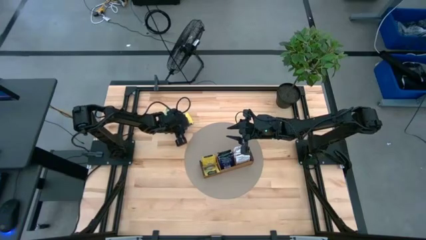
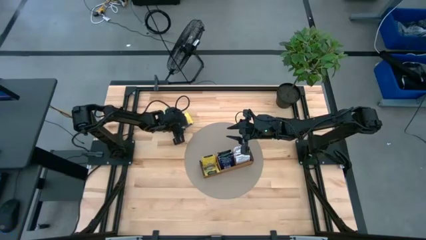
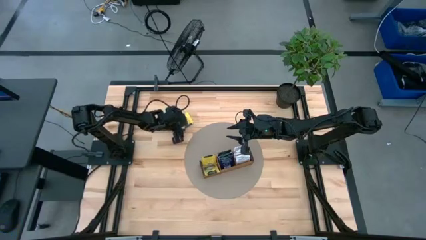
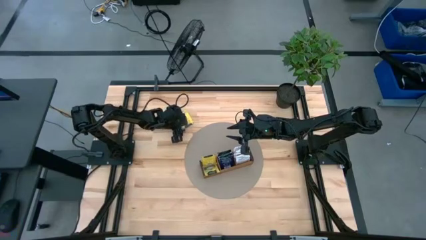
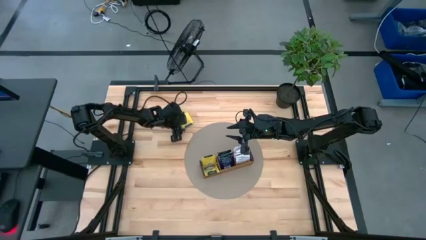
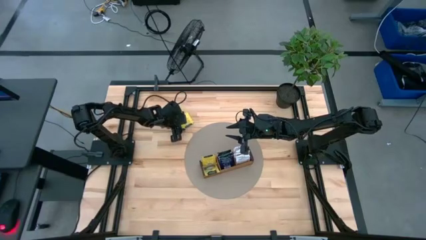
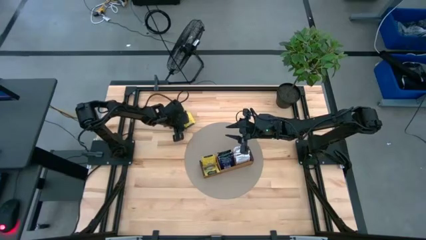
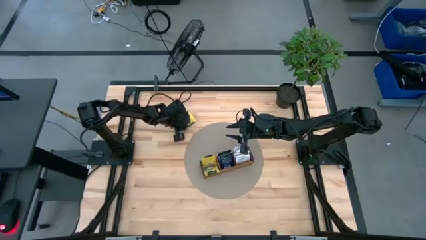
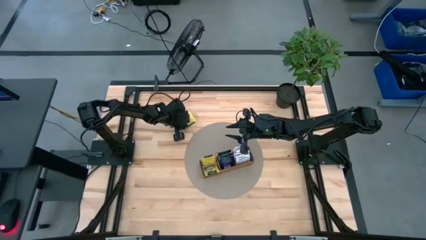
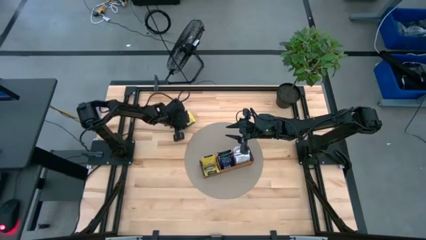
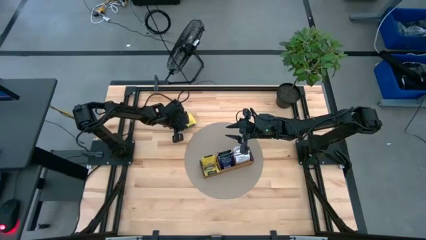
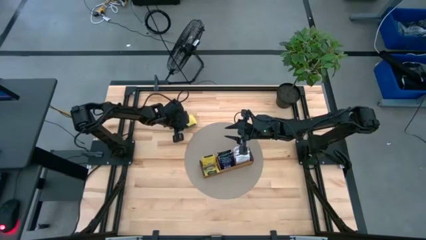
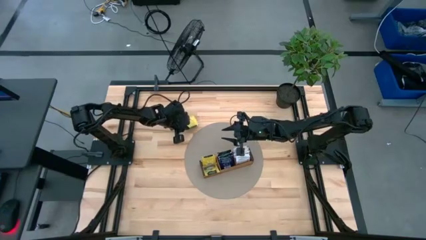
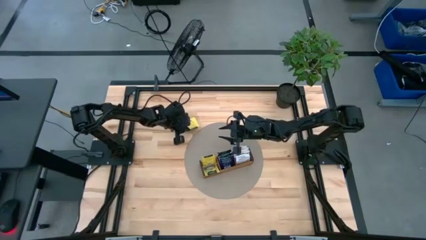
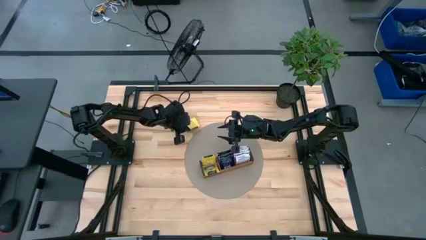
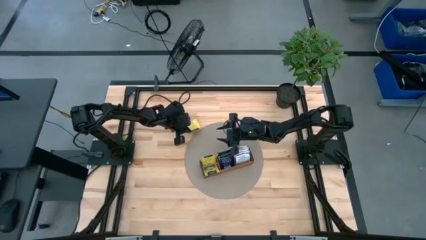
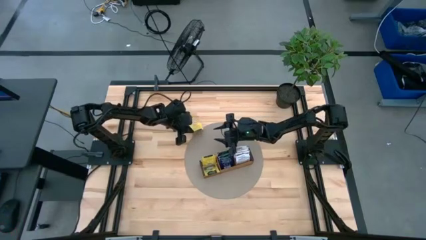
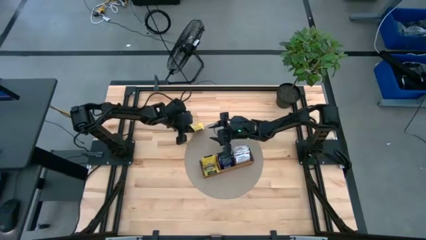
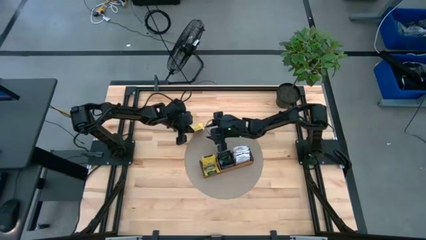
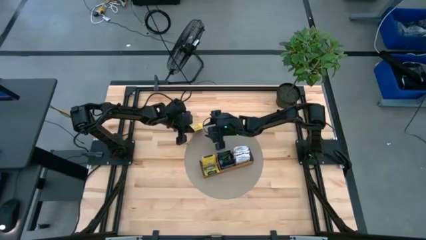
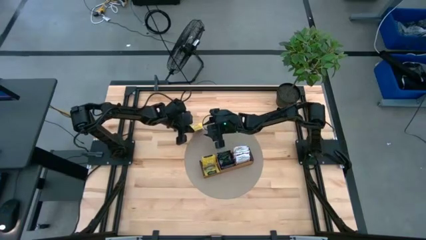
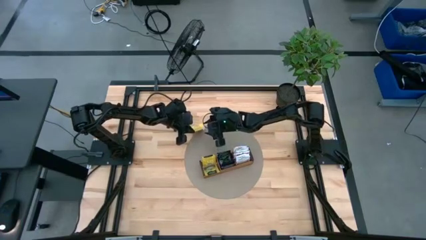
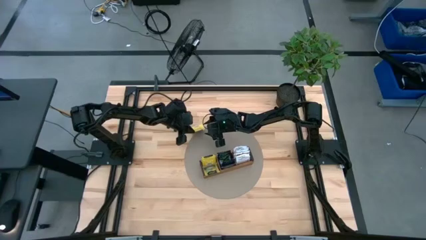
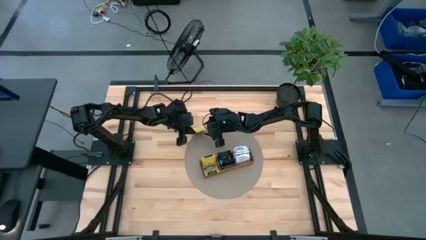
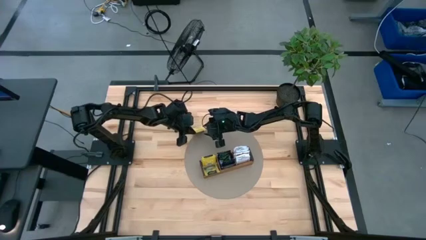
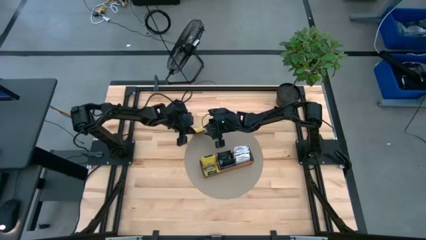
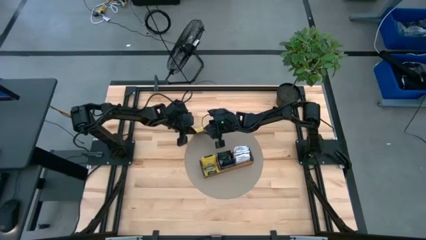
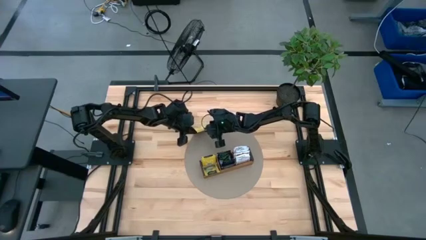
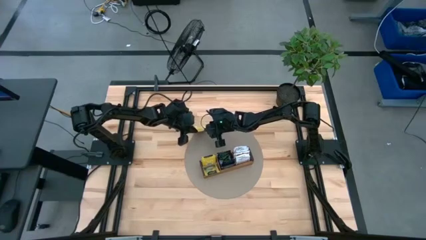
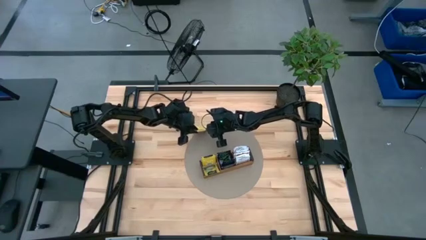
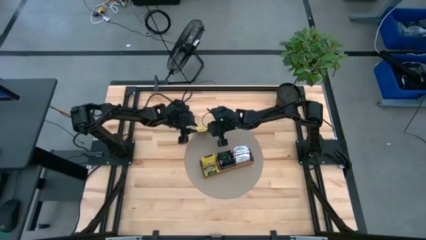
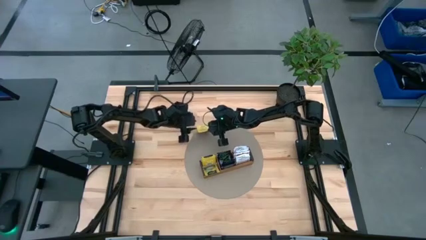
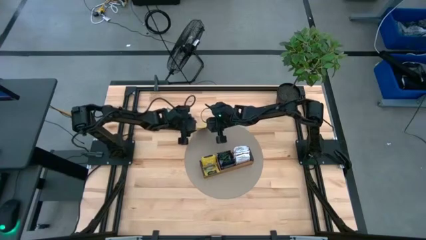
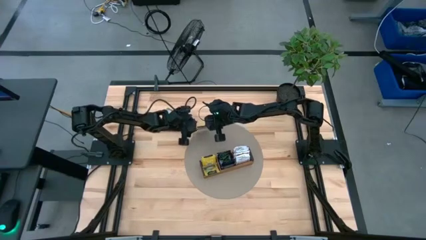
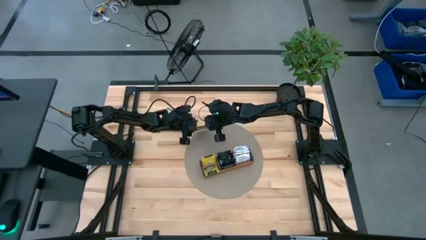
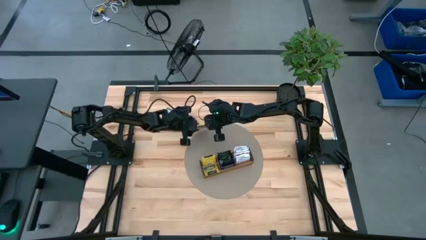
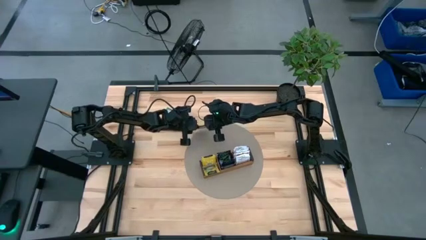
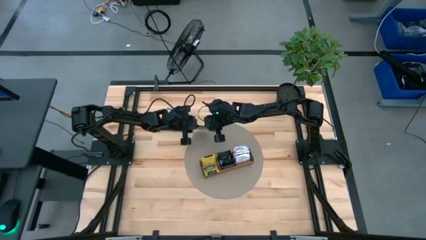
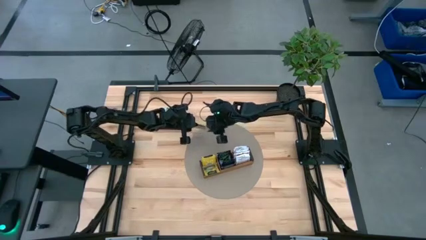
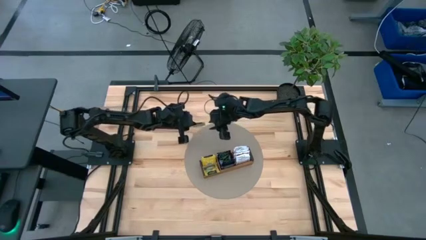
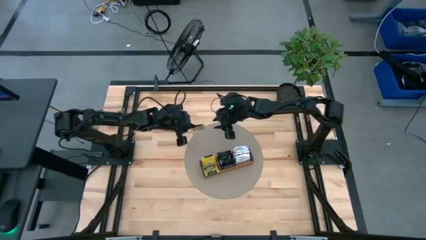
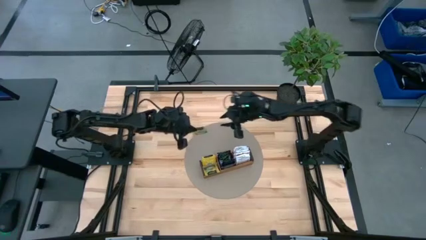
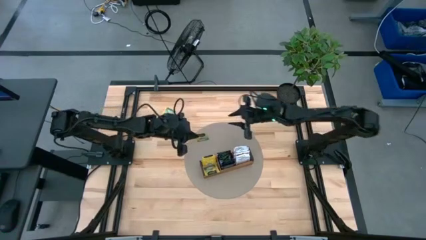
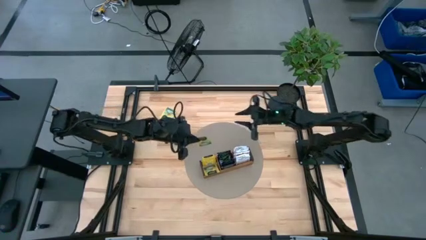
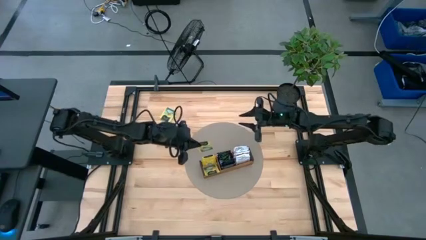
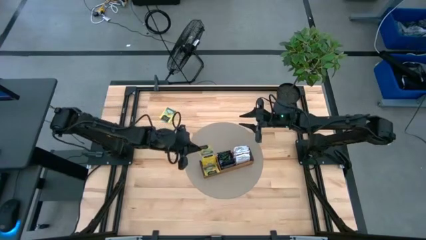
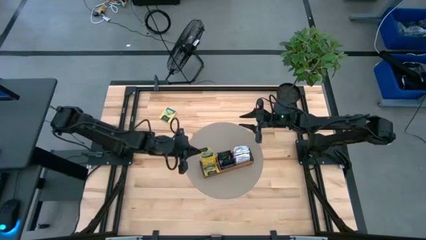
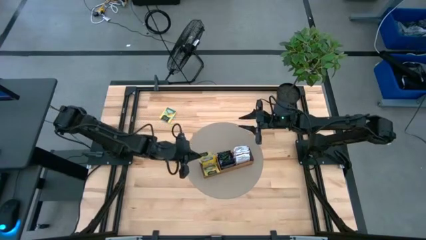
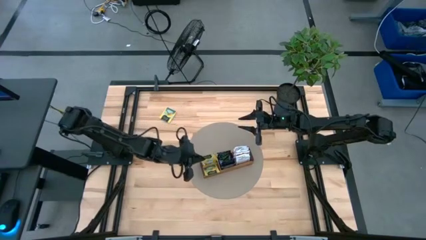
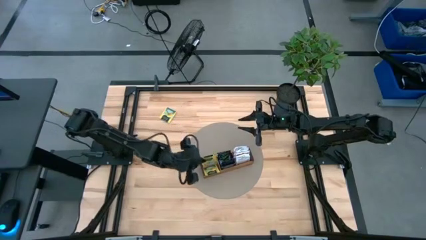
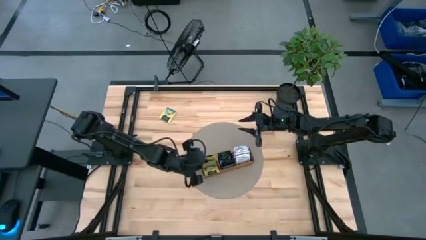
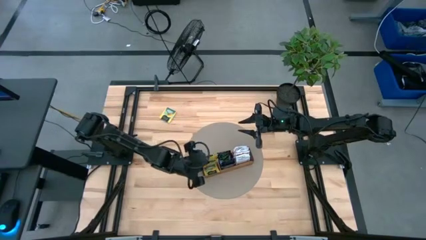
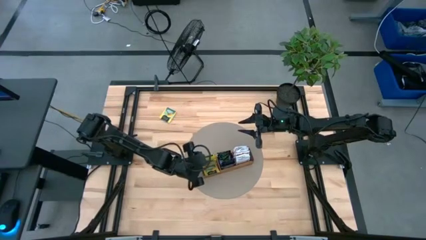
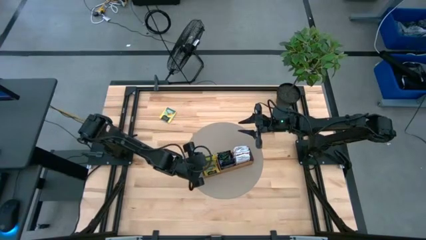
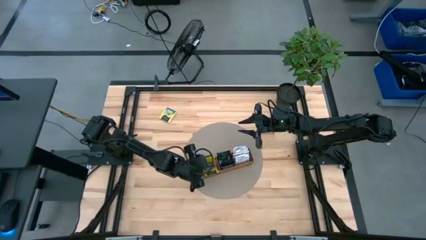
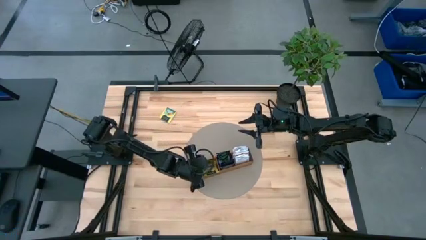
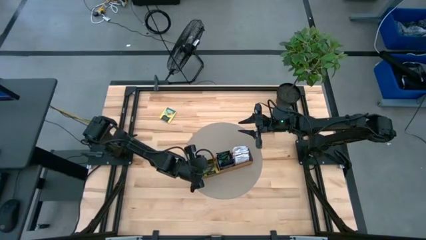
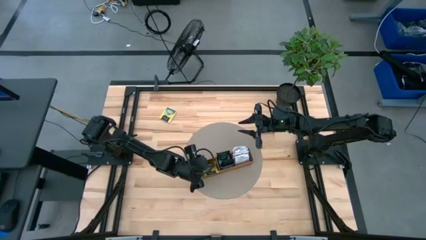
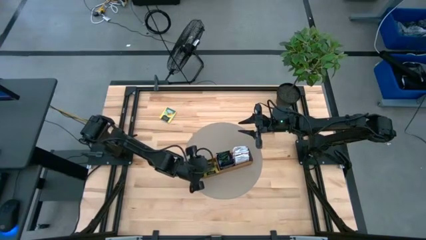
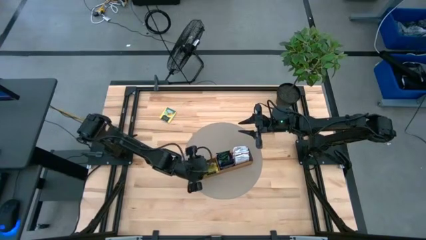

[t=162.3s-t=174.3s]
Task: Pick & Place Tea
Put the yellow tea bag into the left section of the wooden organizer

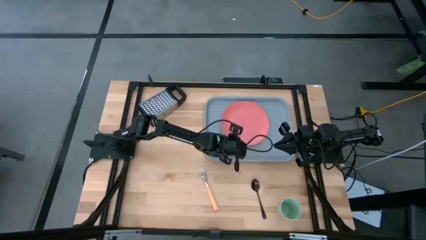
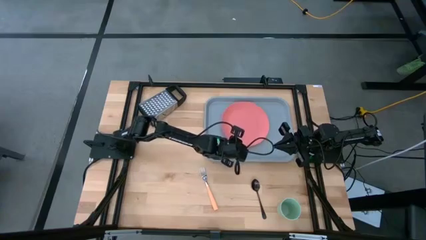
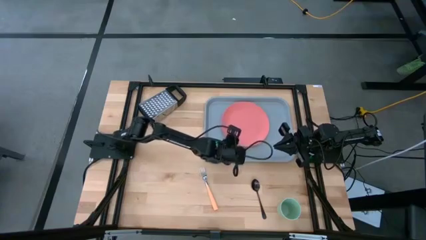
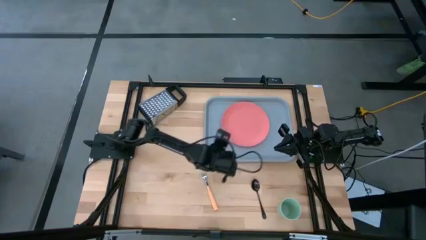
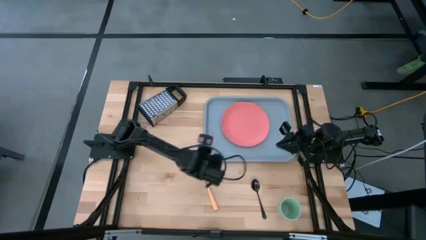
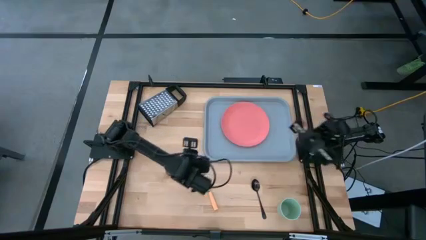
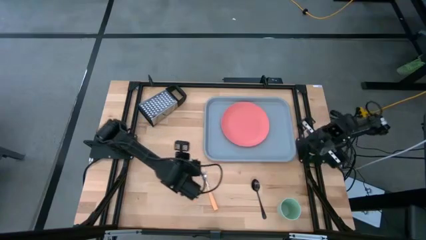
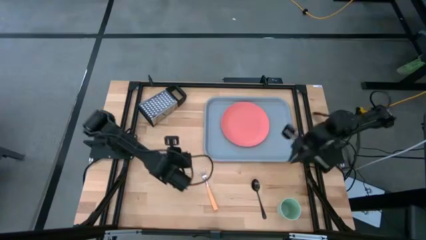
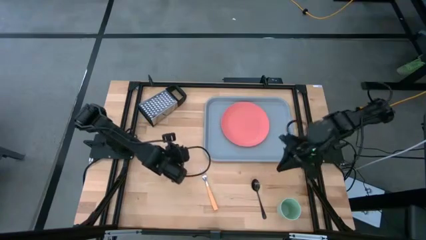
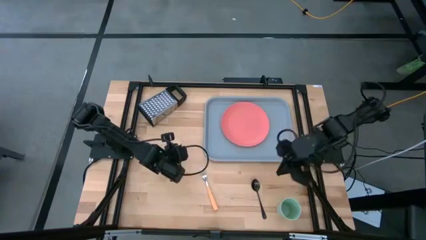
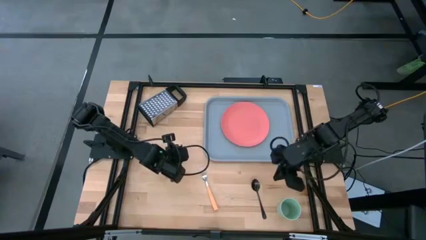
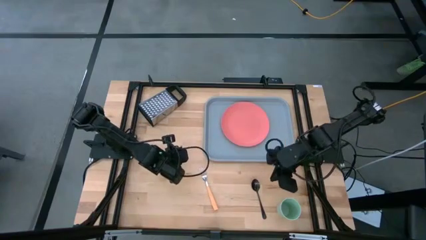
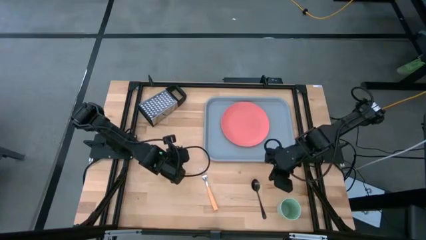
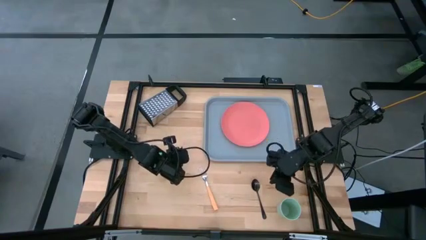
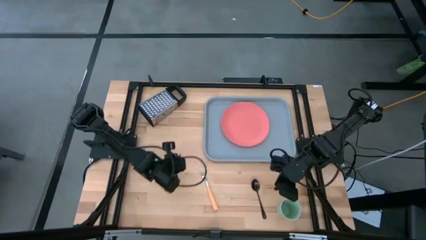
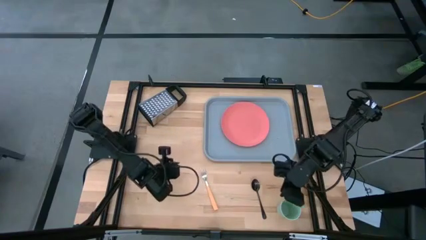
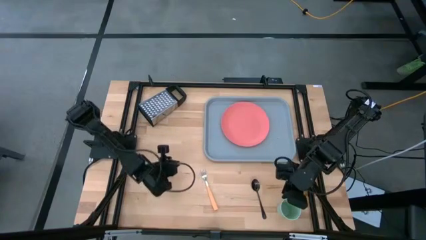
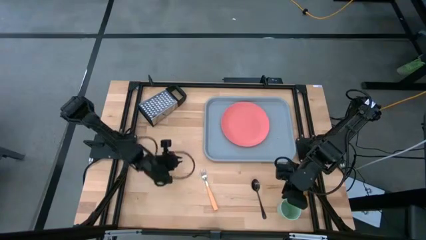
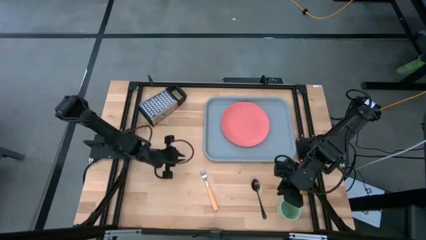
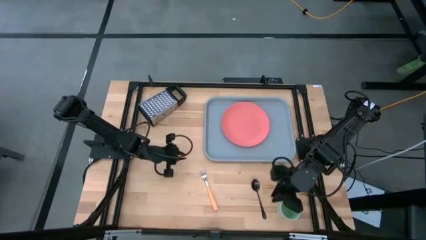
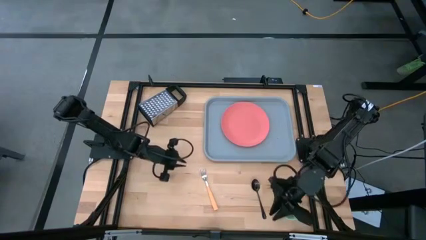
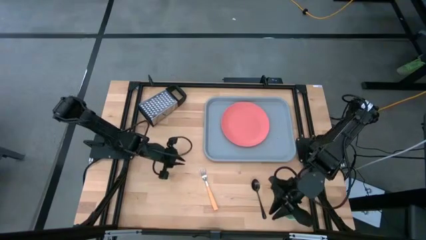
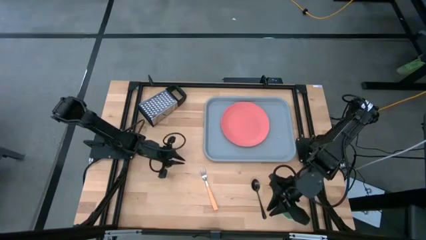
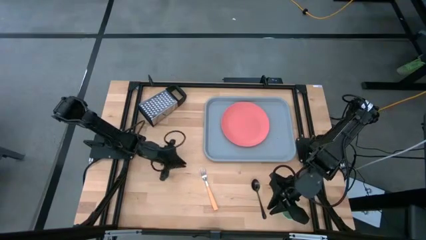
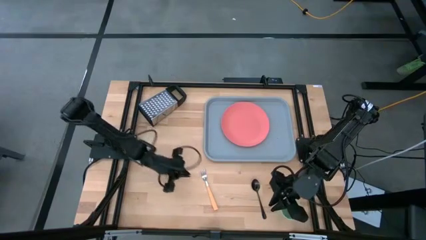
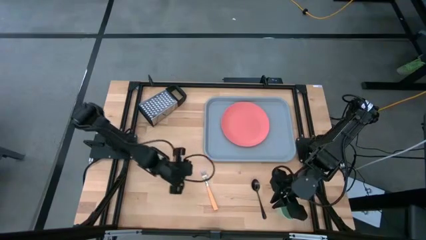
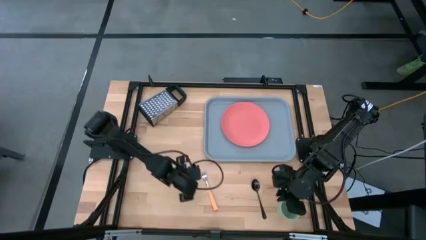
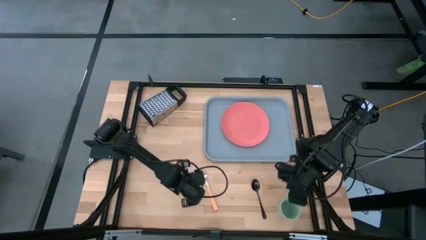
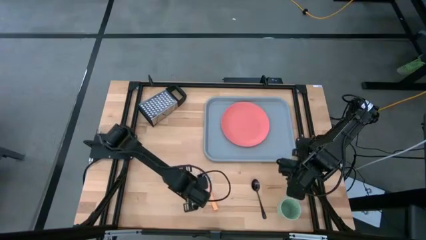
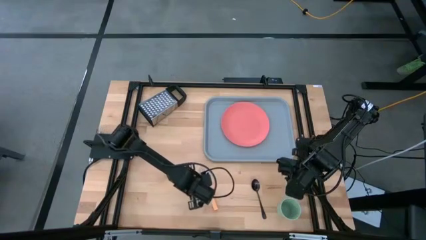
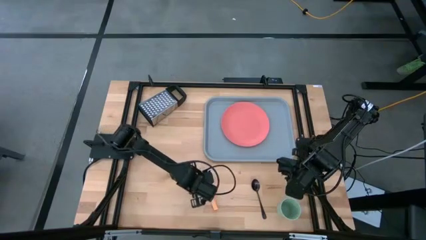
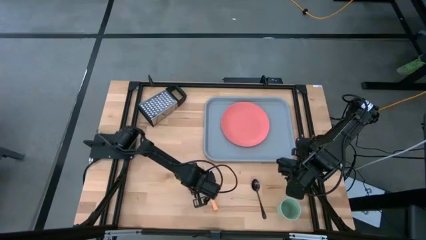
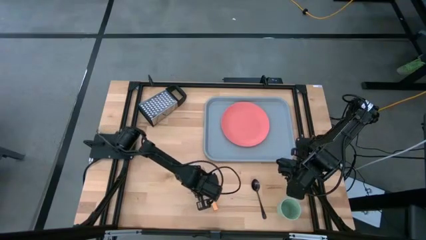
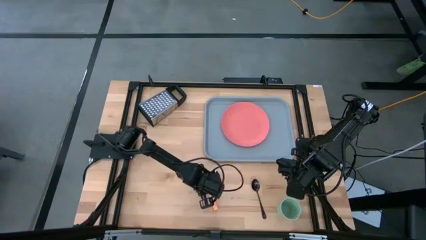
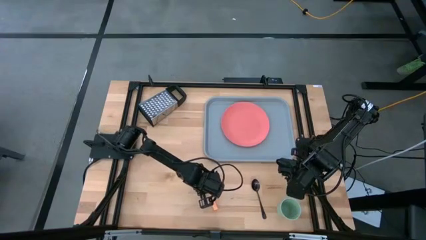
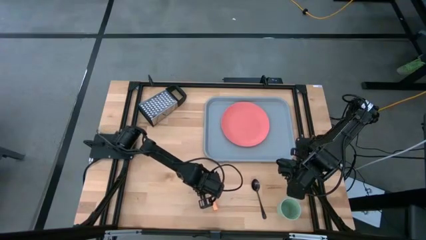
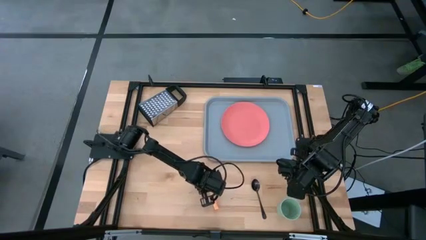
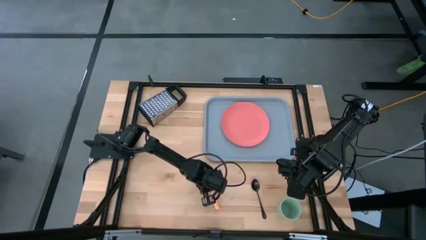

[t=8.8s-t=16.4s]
Task: Pick and place plate/cup/fork/spoon on tray
Adjust the orange fork towards the left side of the black spoon on the table
